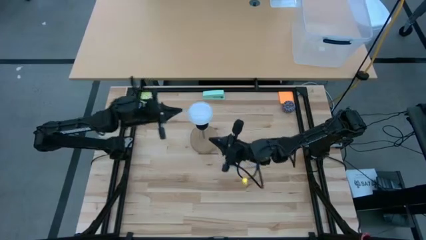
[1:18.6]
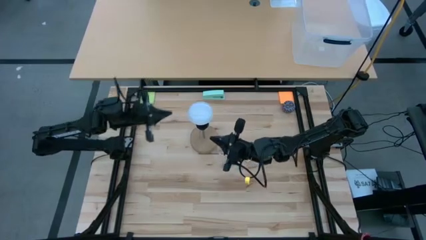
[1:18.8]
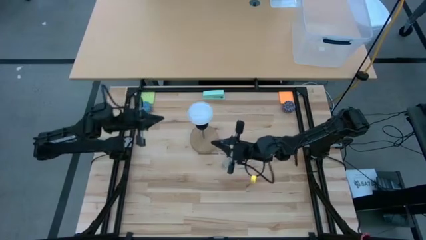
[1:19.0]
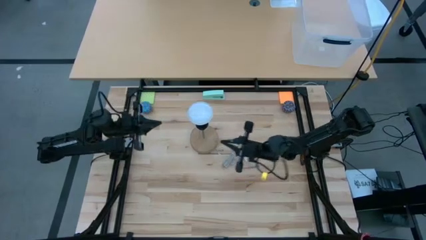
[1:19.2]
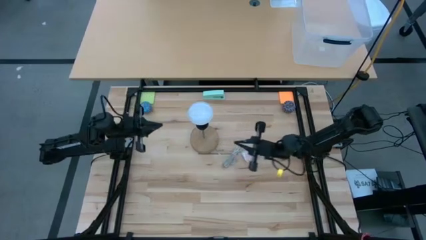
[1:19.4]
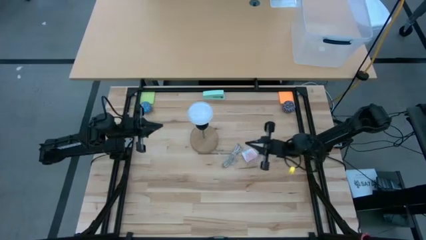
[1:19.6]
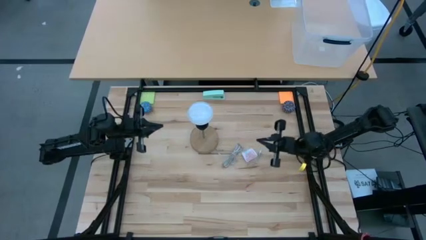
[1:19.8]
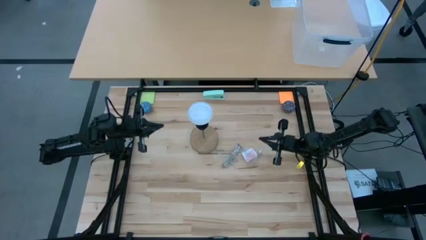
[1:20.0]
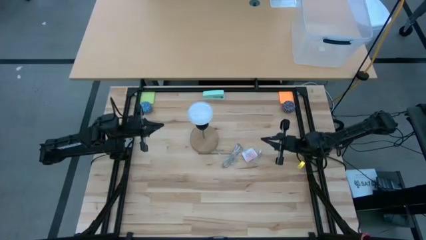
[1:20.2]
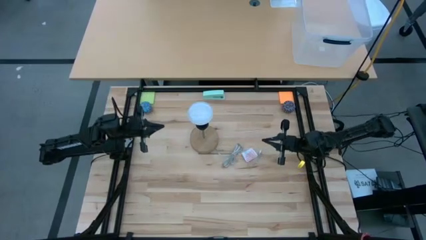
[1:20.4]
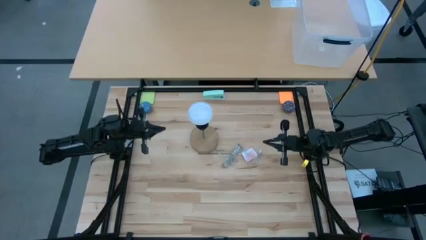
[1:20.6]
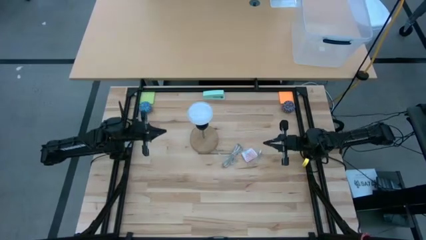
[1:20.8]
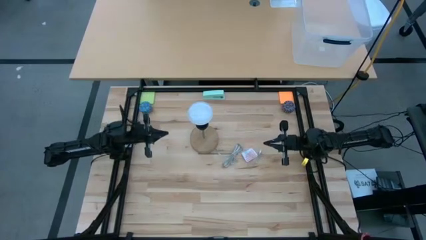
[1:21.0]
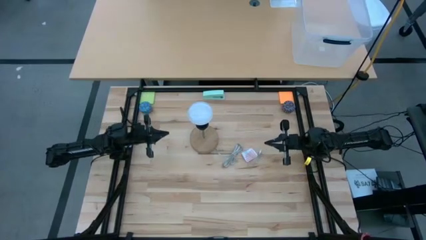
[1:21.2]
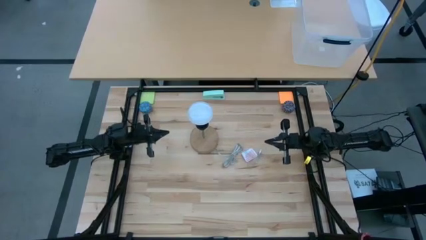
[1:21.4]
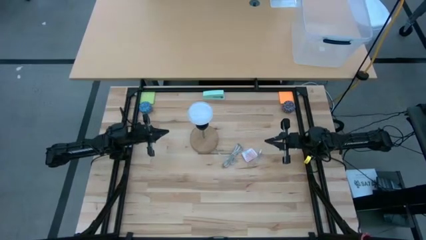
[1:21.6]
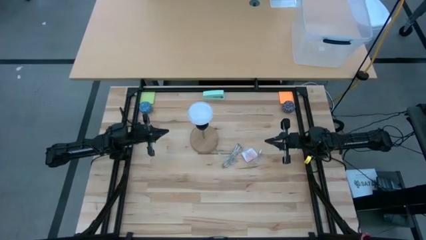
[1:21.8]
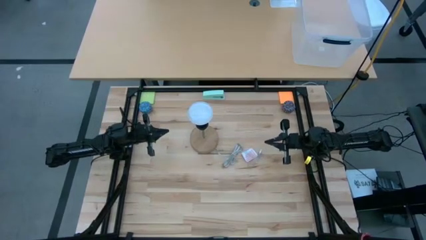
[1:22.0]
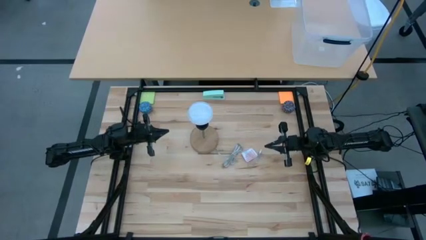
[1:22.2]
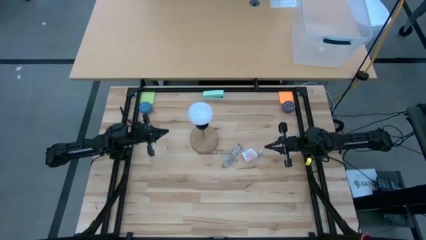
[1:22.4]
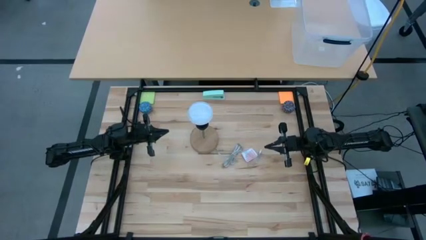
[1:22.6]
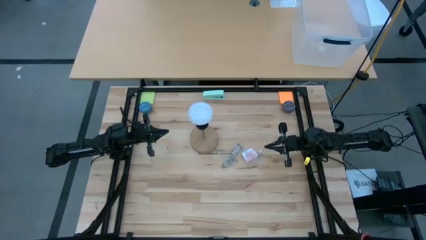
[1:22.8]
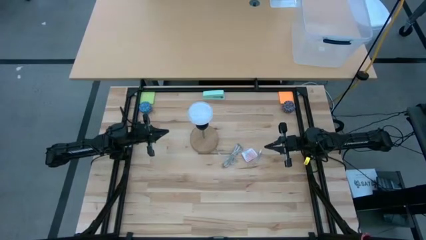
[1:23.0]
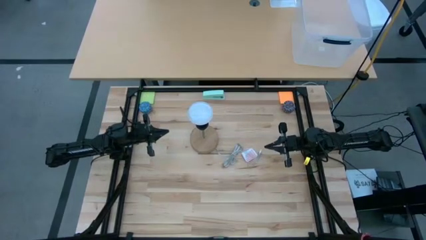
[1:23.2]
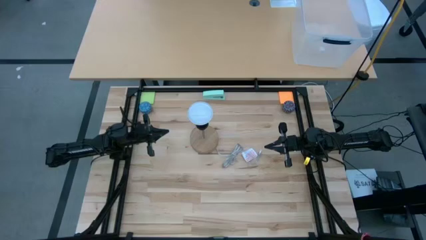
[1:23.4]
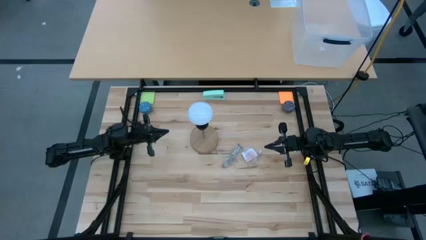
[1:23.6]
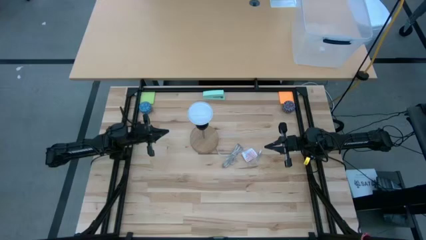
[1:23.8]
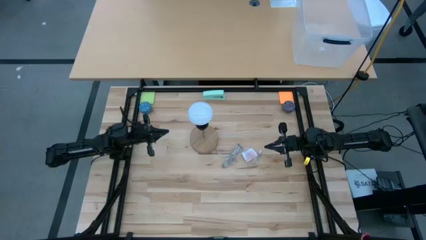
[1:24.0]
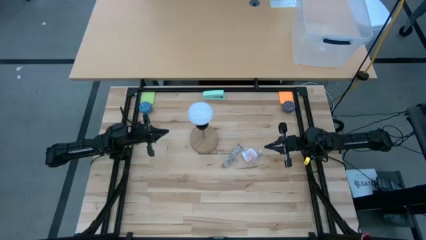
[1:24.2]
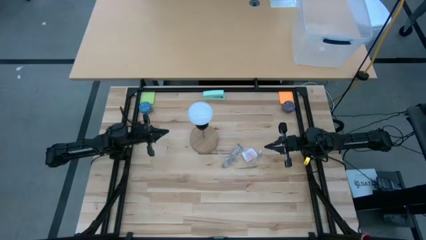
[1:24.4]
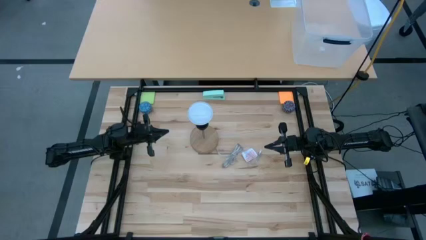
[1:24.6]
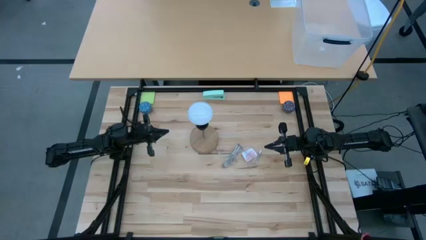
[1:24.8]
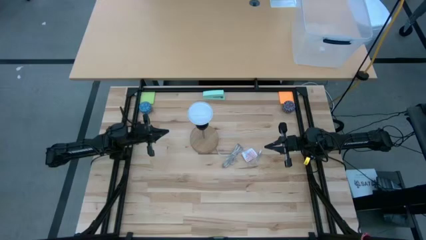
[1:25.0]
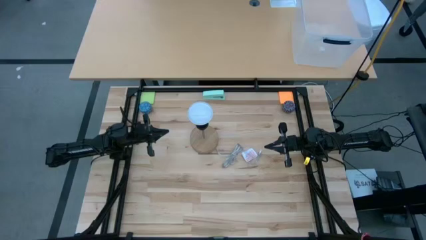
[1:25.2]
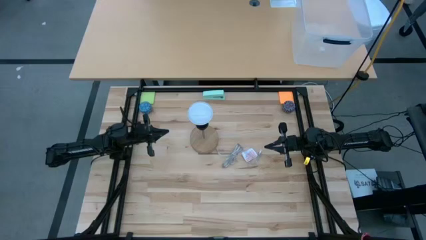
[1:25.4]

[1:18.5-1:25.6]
Task: Screw lightbulb
Return to Home Position

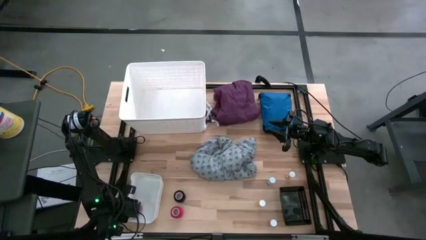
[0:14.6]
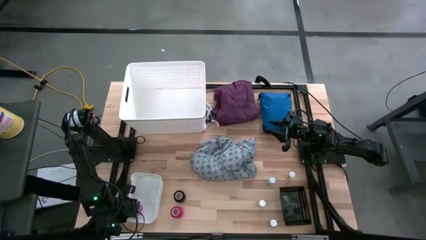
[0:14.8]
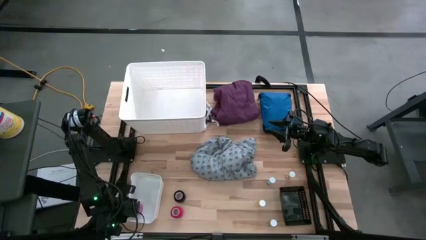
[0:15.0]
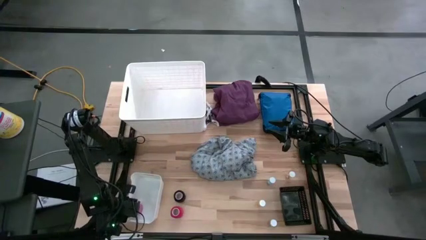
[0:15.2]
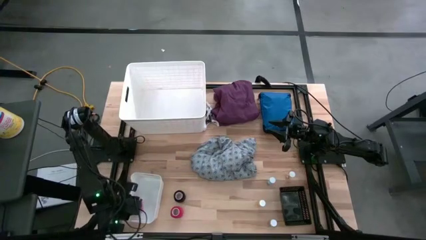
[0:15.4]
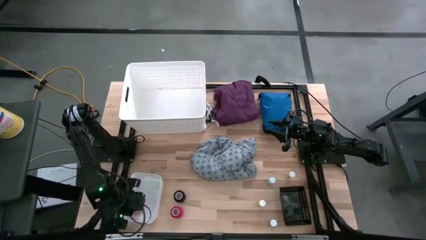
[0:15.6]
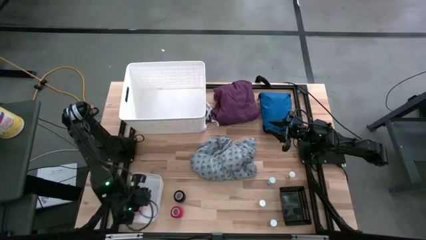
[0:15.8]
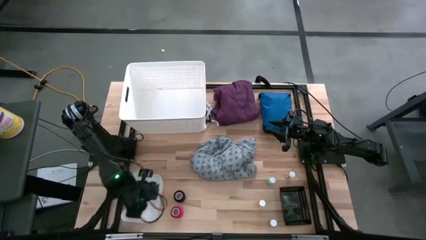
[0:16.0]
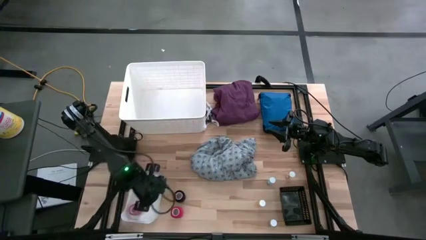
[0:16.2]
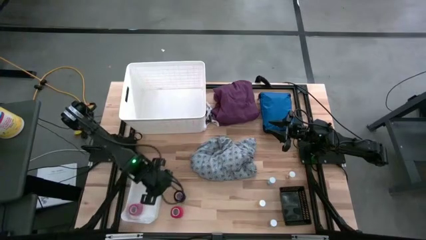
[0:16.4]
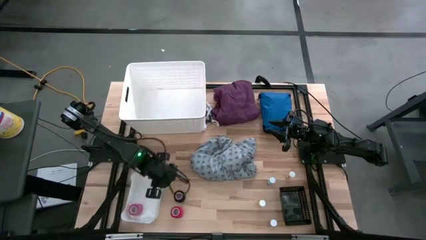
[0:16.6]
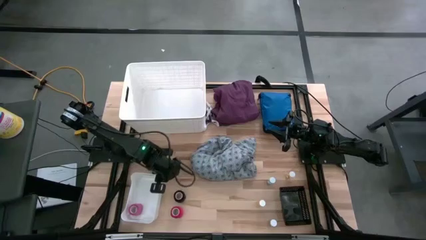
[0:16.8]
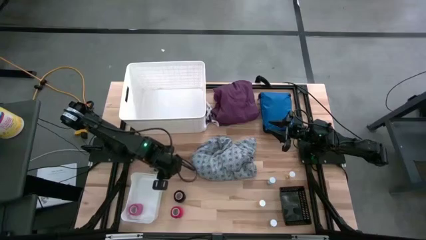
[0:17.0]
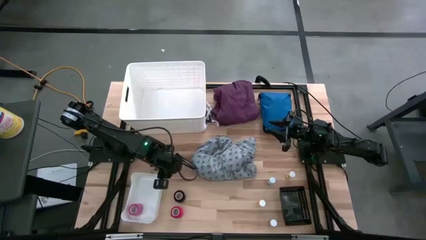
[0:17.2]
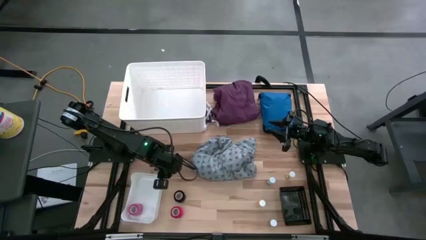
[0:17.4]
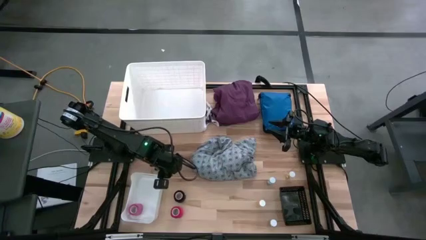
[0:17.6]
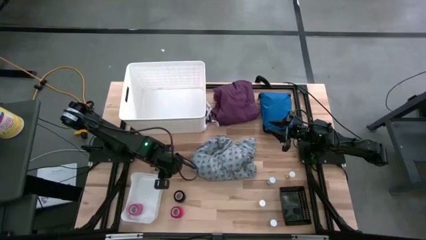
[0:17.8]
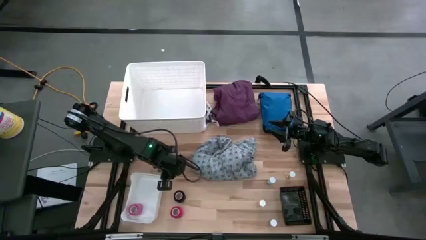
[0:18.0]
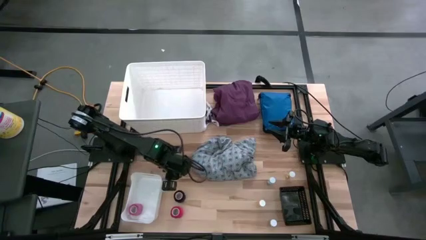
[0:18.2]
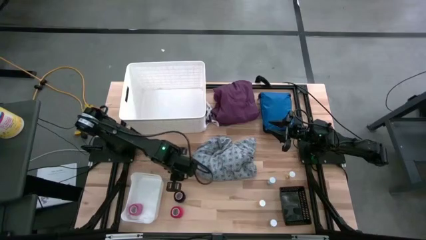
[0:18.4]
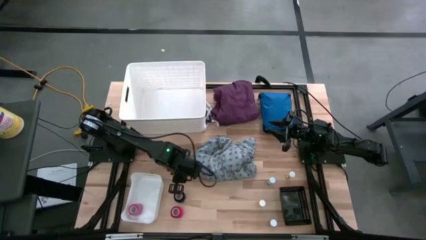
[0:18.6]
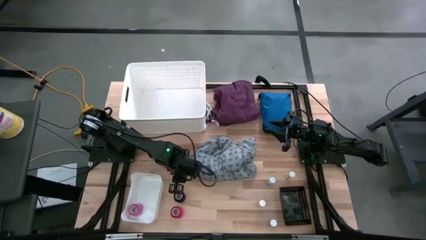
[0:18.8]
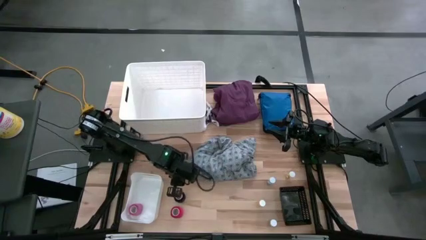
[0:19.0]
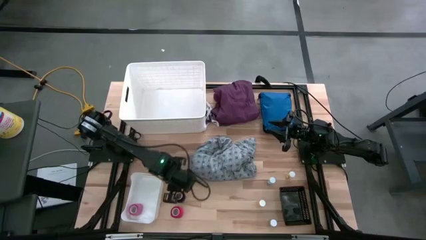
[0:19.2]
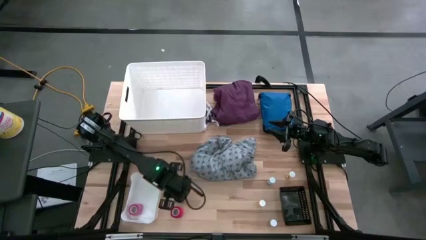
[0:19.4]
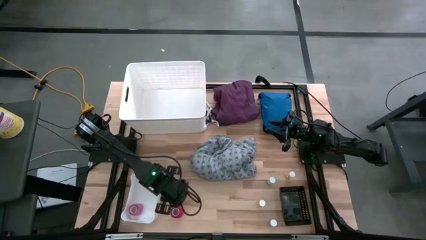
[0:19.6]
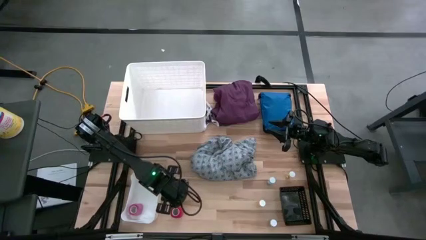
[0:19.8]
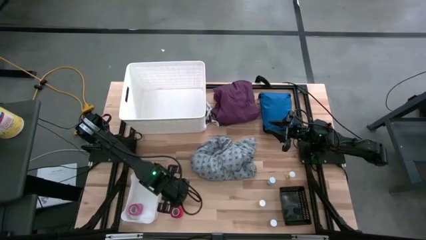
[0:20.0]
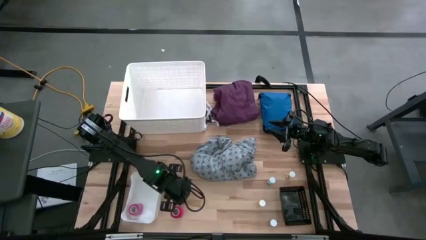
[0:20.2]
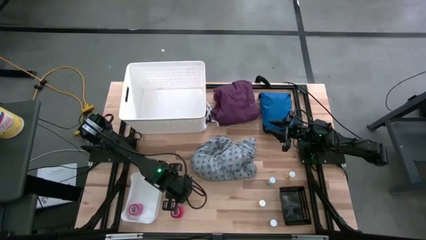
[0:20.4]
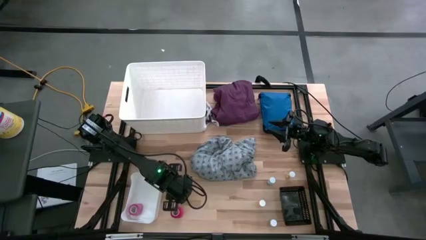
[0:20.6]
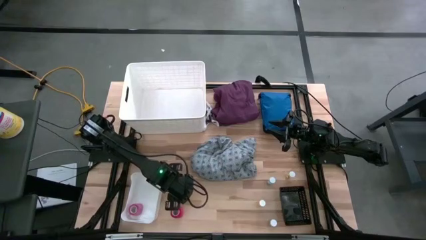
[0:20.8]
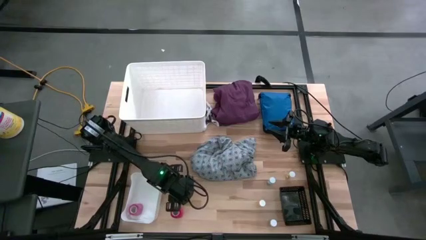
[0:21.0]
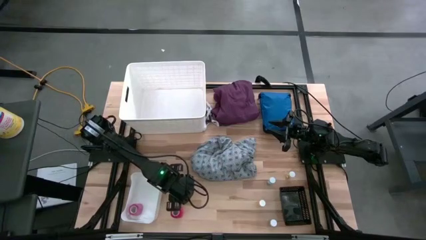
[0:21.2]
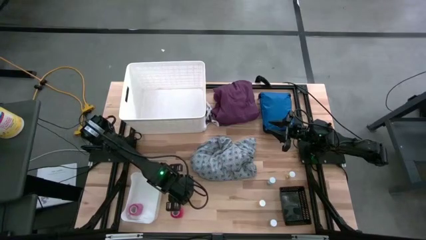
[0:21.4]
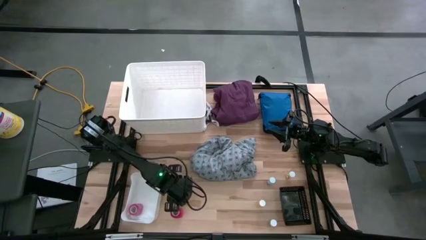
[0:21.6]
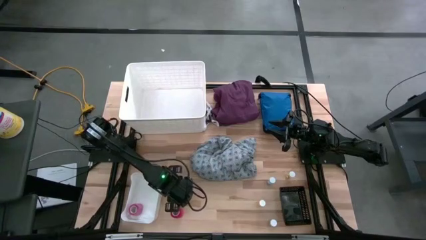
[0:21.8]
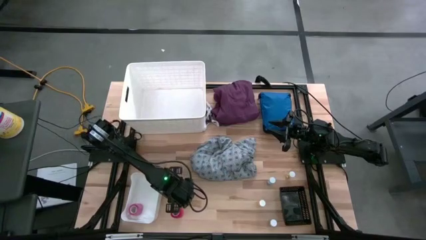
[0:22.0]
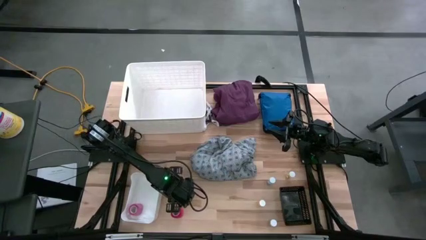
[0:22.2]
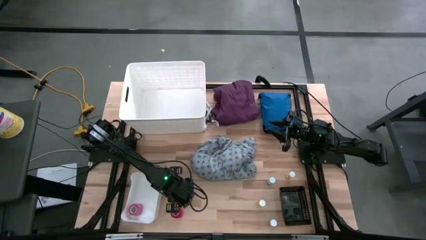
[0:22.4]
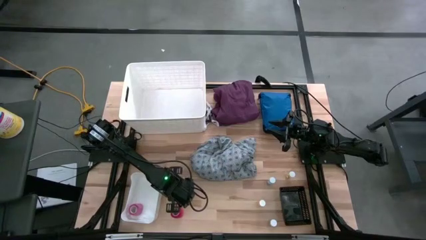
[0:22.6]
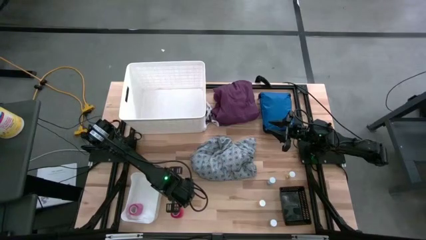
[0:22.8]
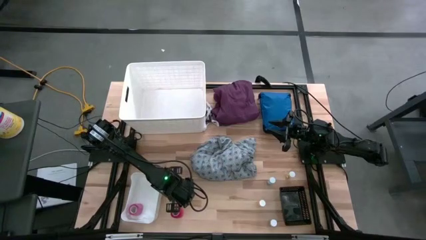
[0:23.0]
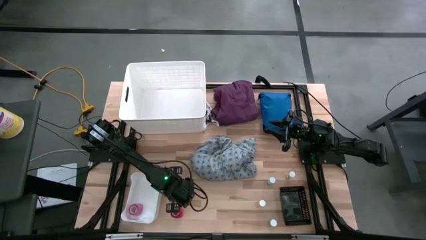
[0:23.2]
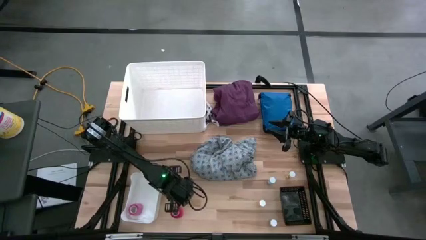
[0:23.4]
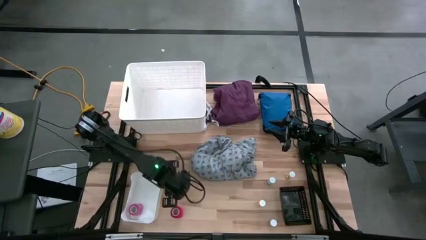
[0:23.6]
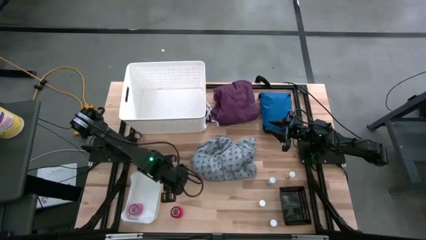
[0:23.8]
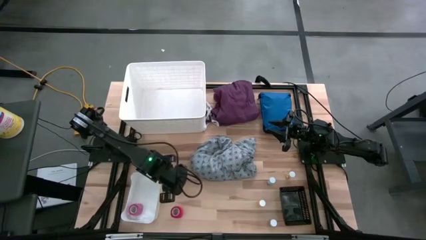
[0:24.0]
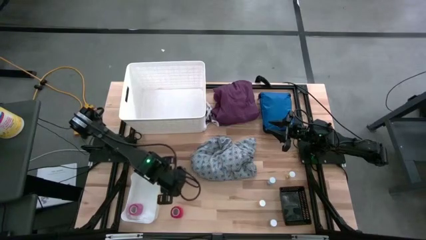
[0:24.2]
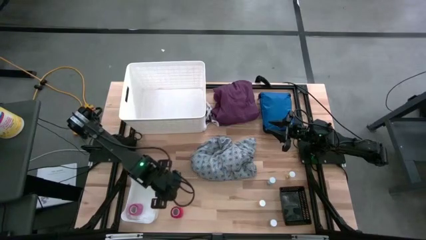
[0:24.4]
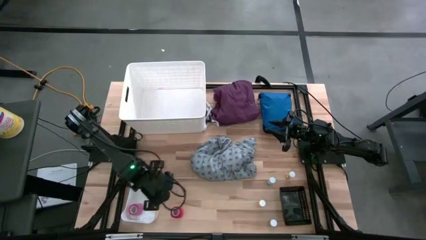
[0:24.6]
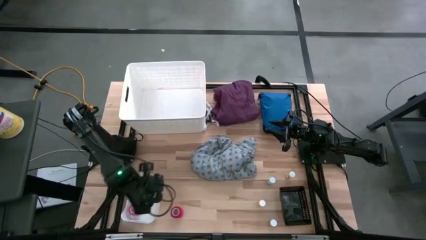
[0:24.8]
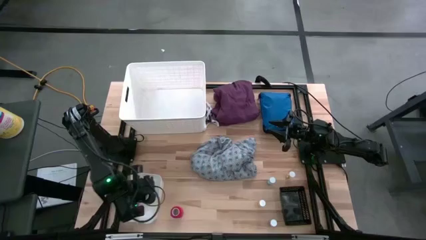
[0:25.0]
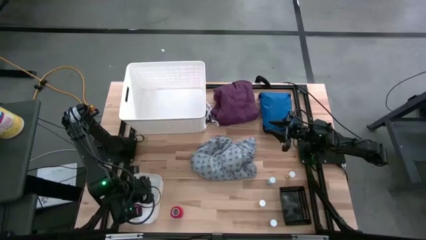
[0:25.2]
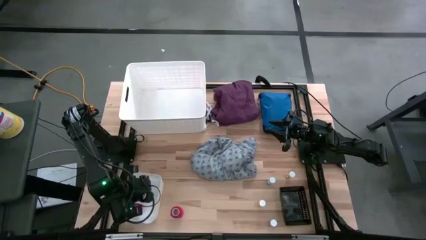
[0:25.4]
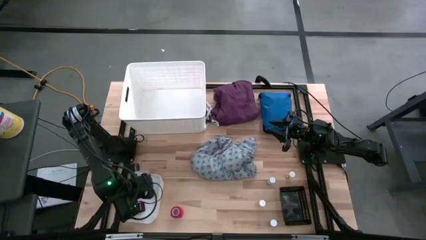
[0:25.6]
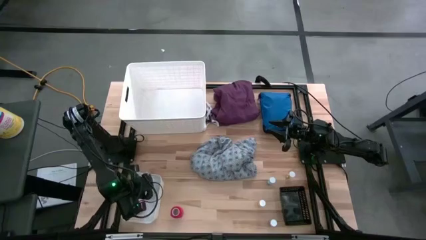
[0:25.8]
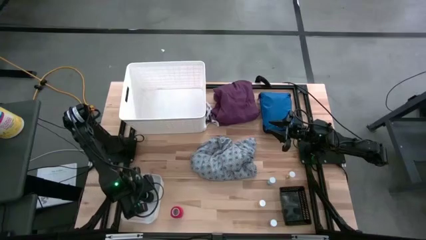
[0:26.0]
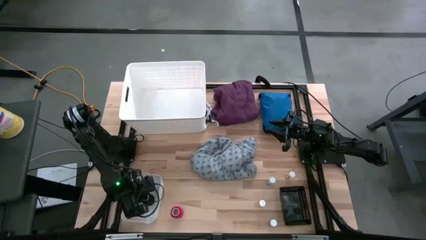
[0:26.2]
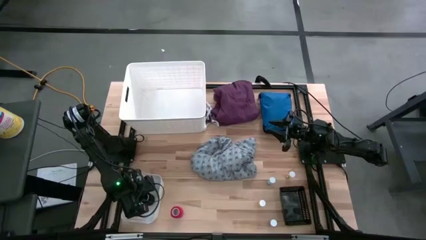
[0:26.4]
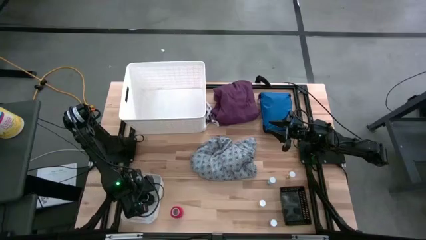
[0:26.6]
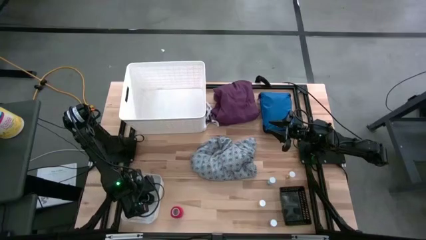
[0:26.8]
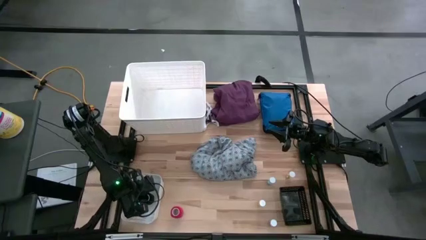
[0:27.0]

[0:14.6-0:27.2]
Task: Pick & place medical supplies in basket/bin
Put the black bandage into the bottom white bin
